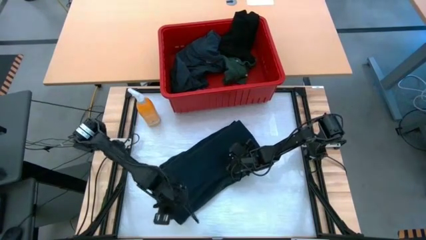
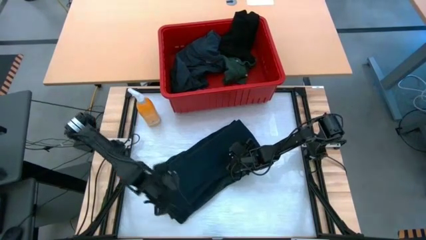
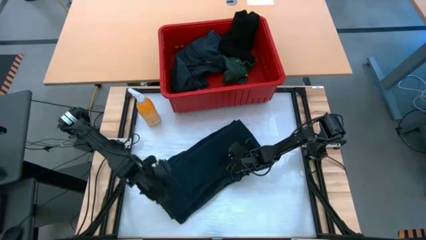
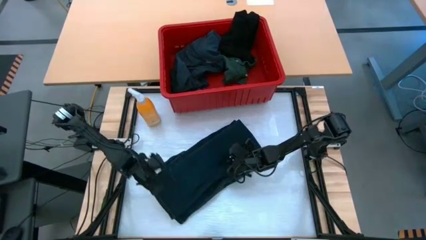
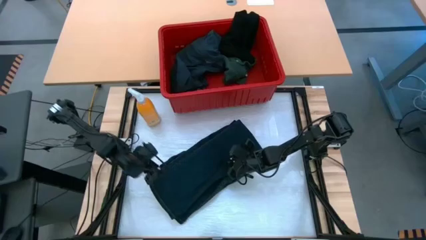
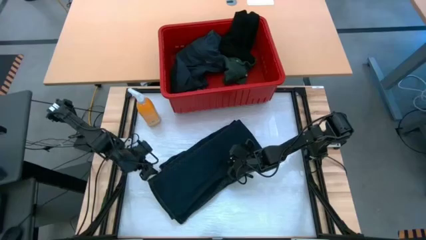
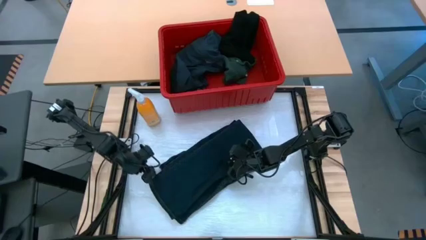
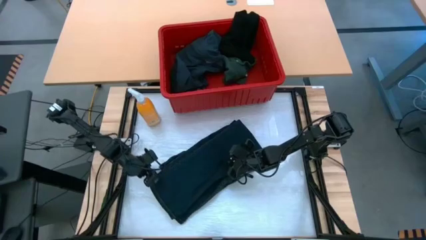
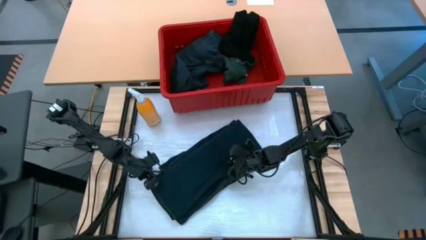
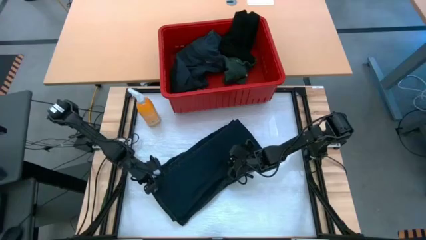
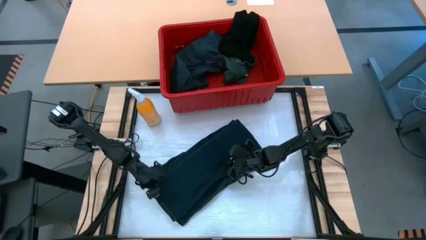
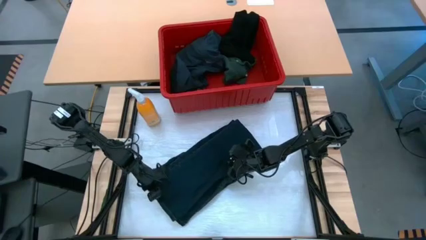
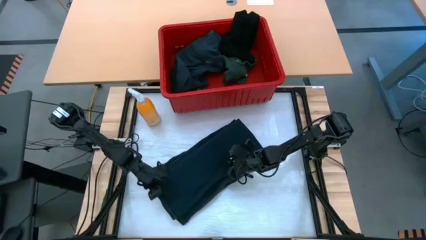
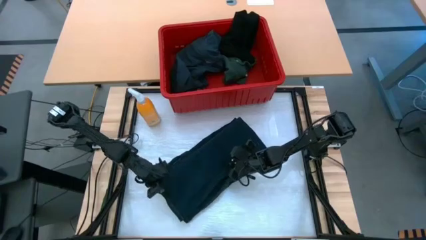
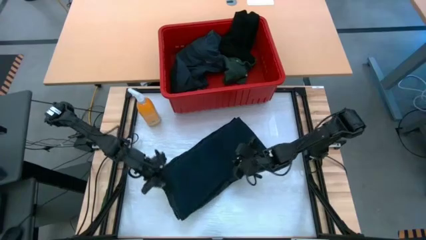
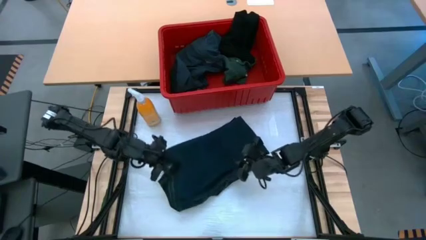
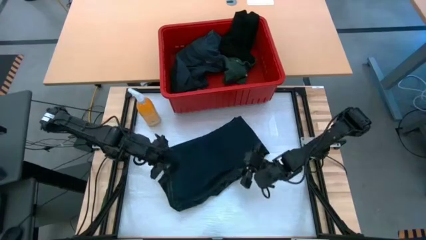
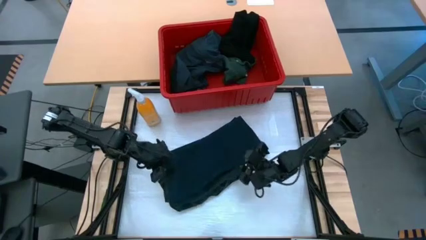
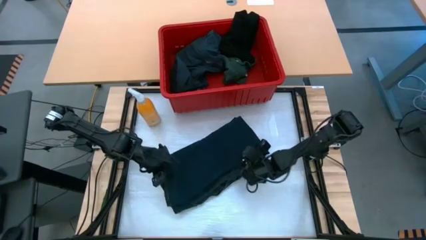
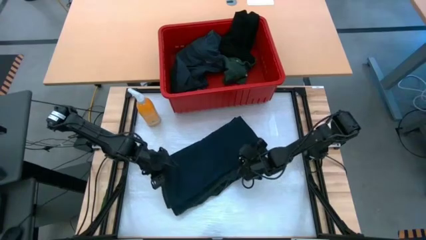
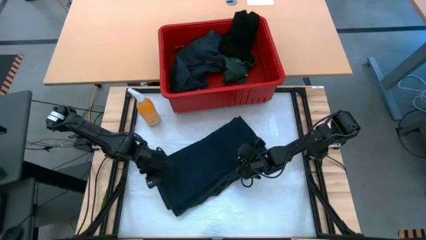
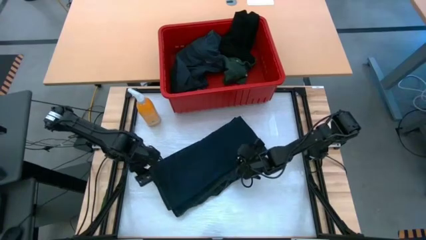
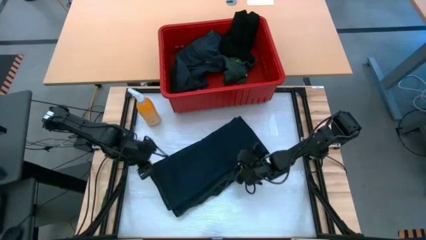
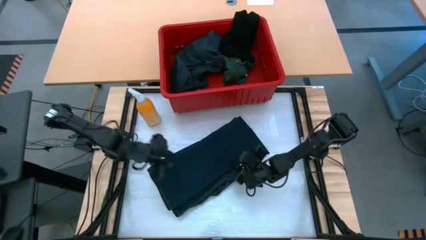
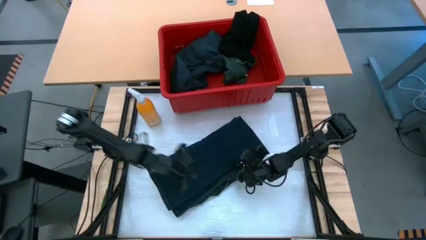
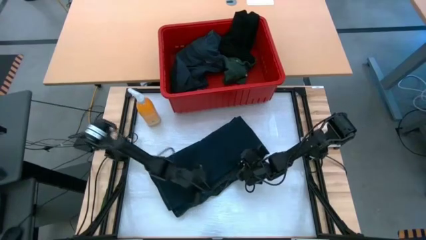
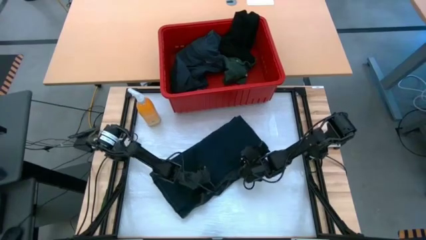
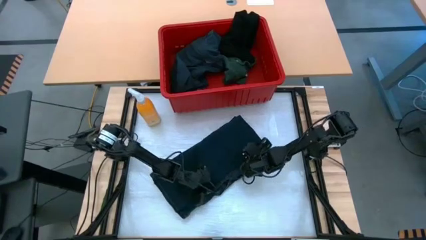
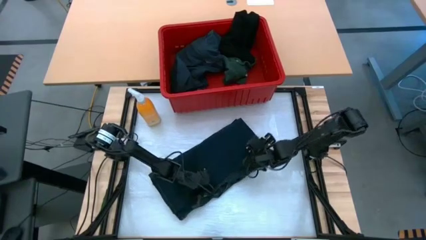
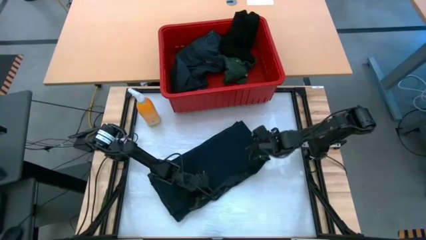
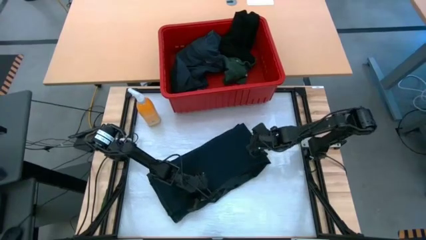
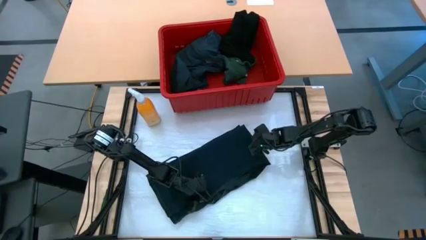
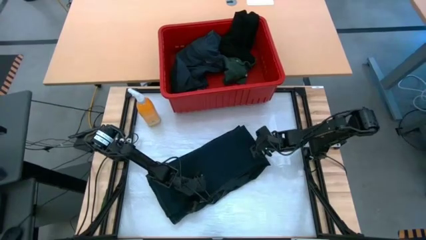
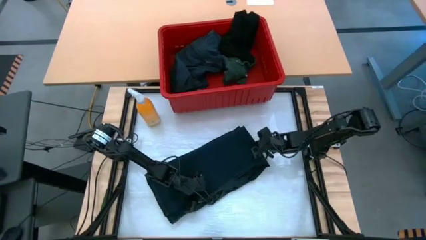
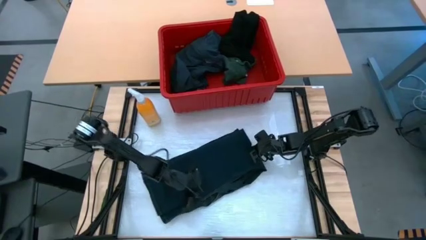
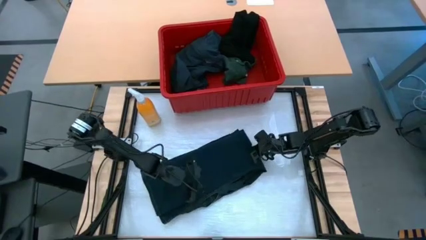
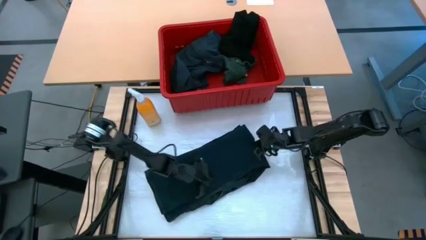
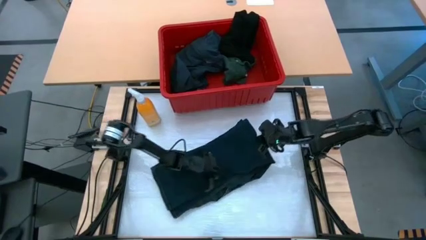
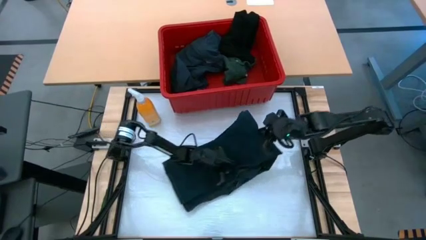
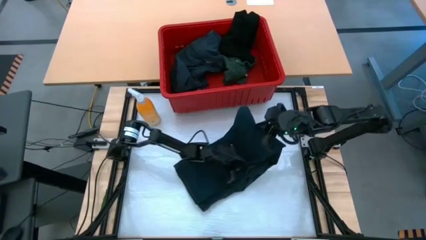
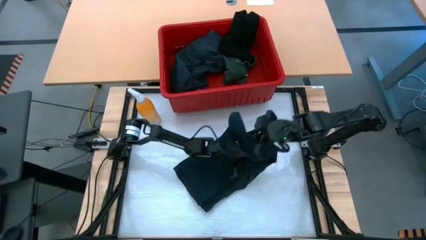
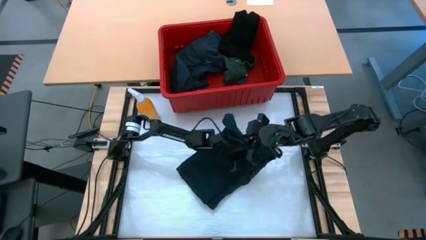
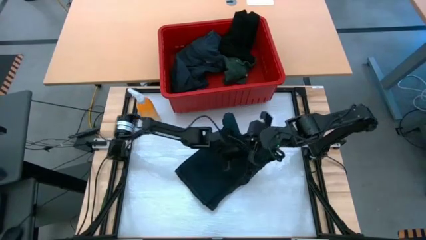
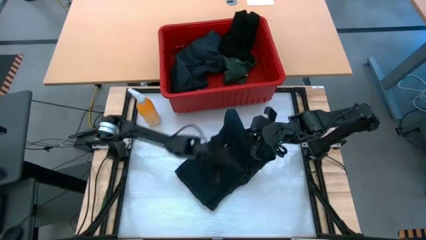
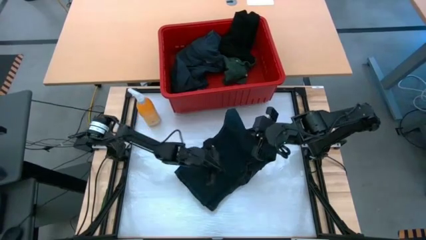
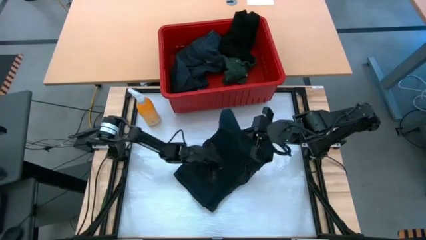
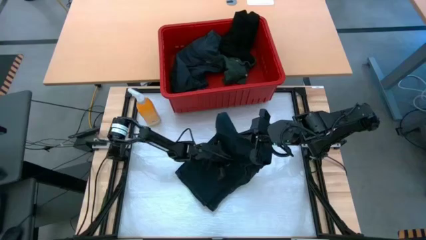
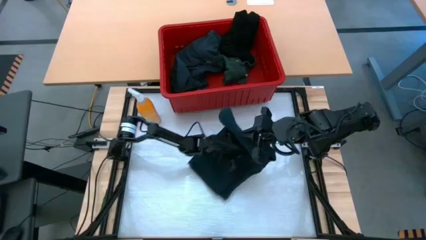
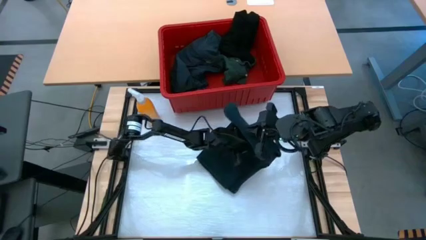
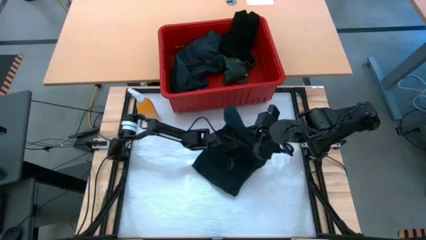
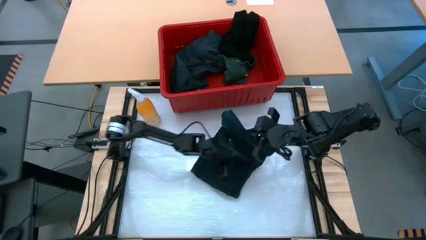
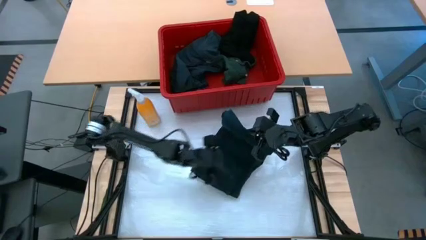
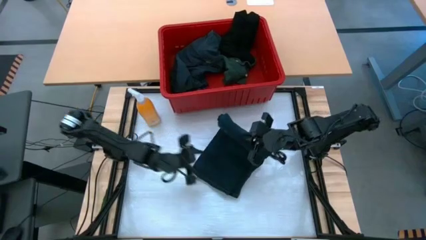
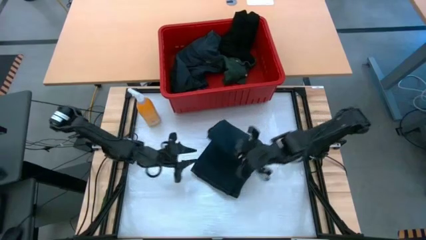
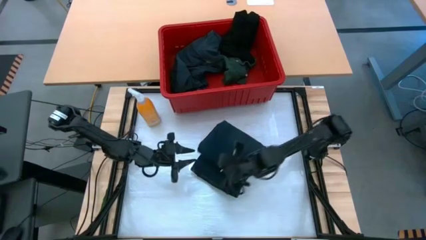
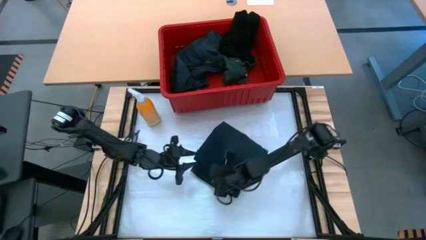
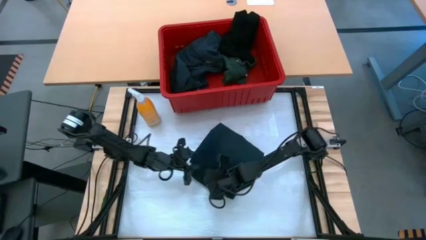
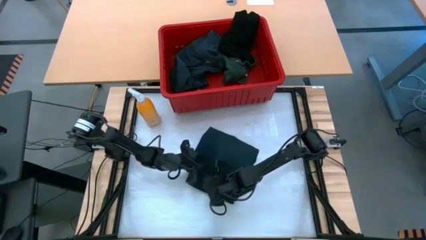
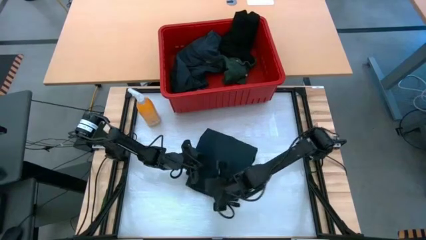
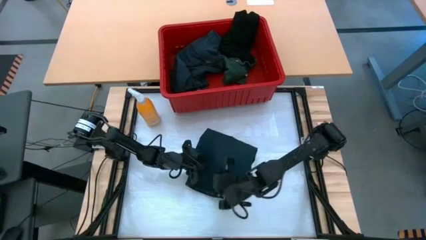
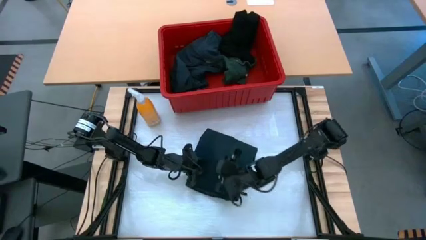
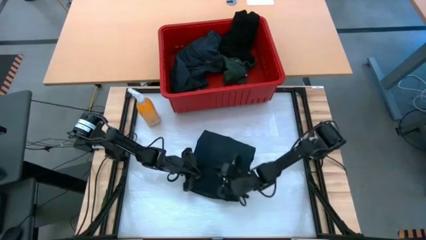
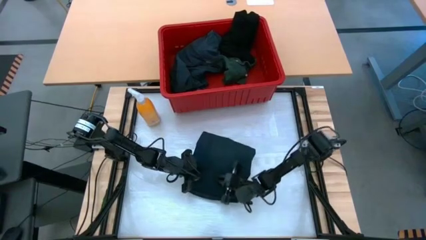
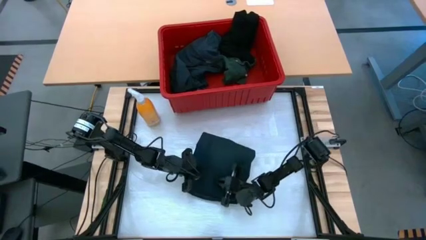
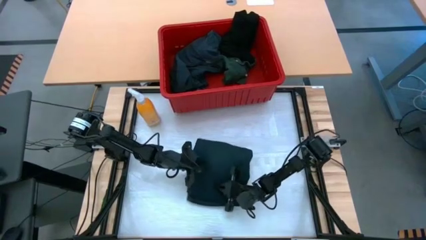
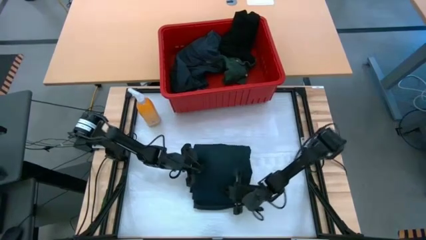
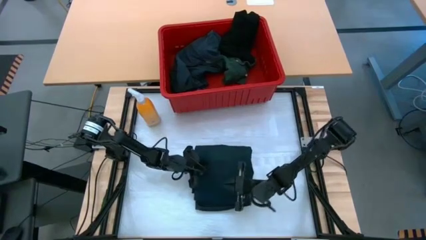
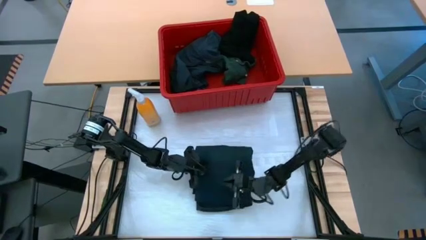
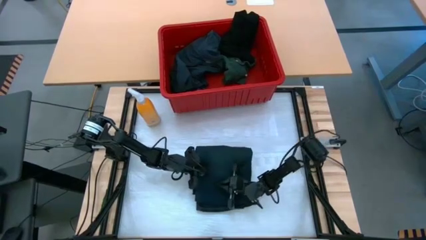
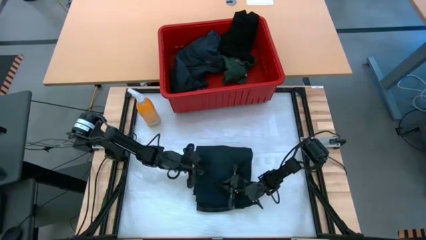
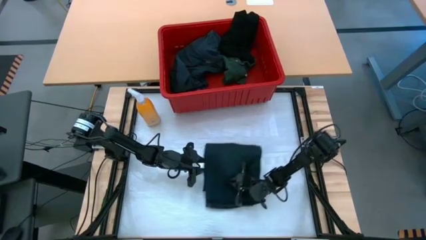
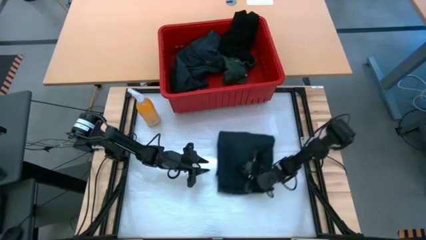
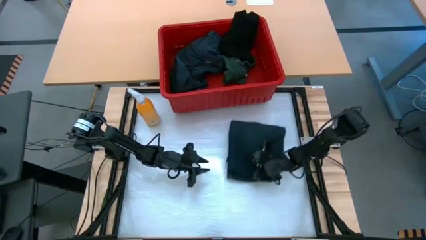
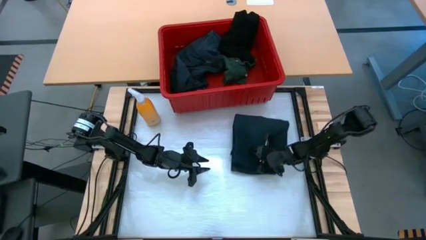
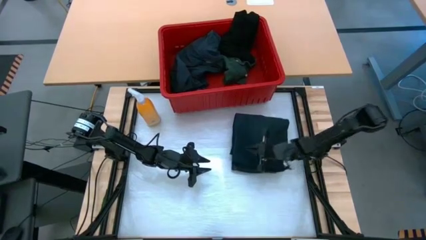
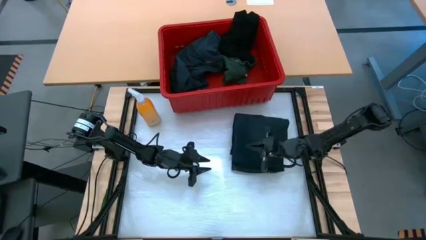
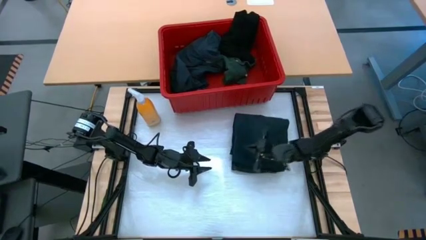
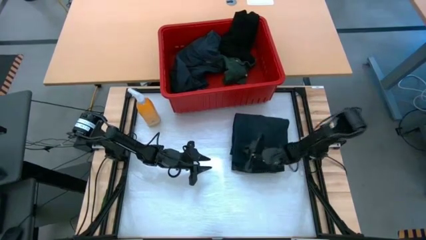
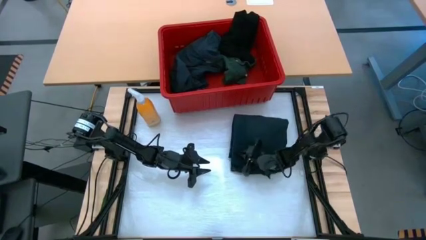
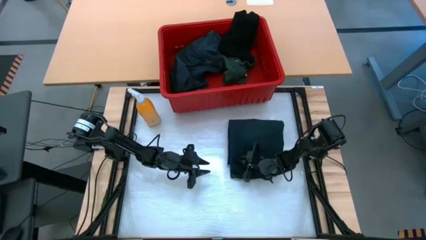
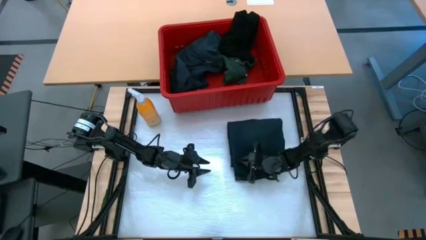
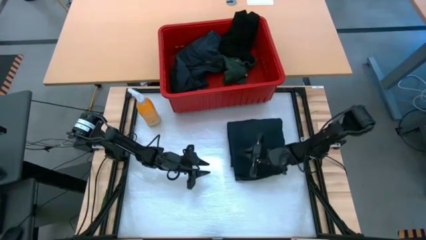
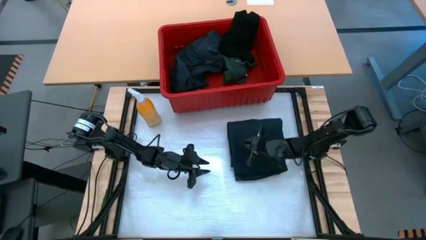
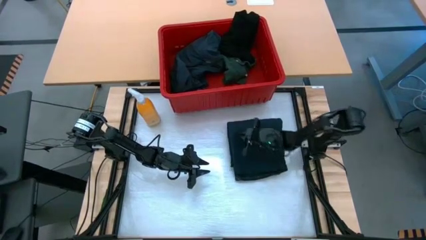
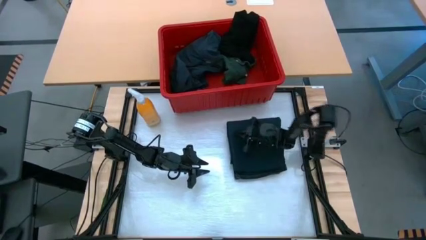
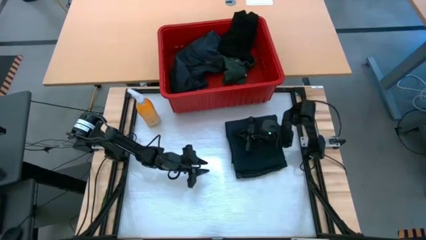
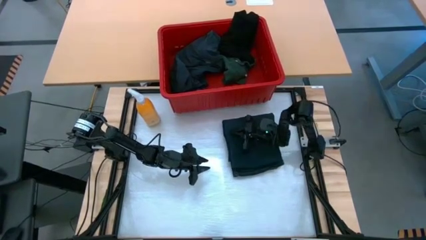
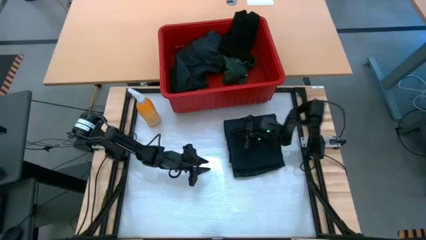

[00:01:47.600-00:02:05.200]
Task: Fold Laundry from Bin
Fold the dark blue jeans
